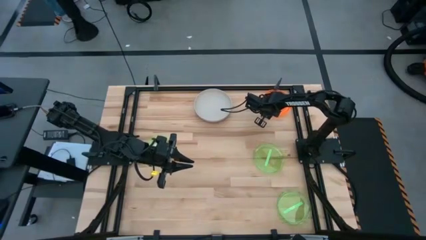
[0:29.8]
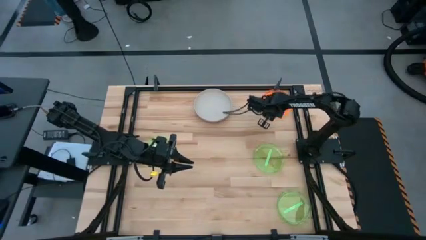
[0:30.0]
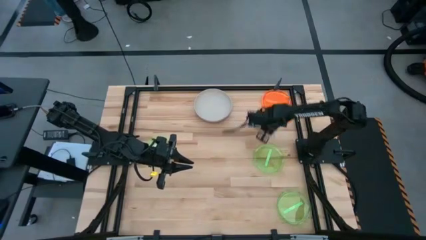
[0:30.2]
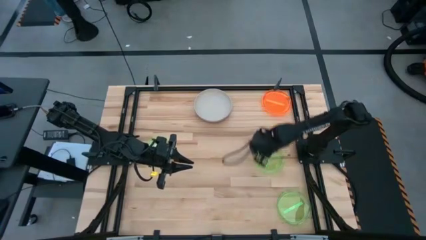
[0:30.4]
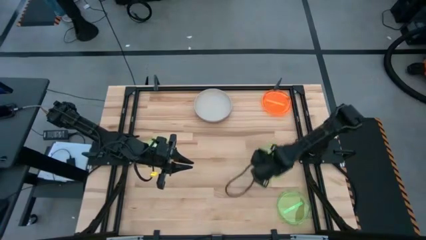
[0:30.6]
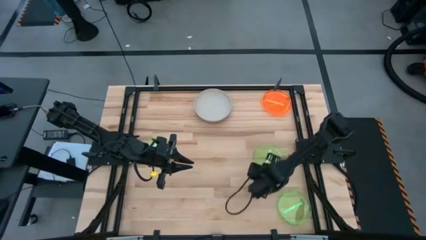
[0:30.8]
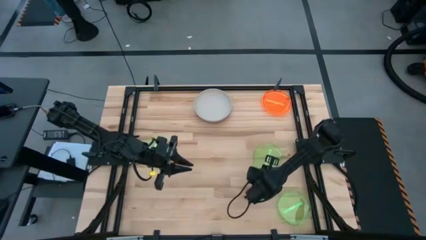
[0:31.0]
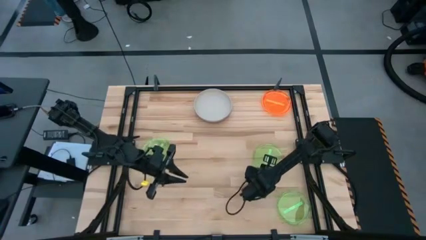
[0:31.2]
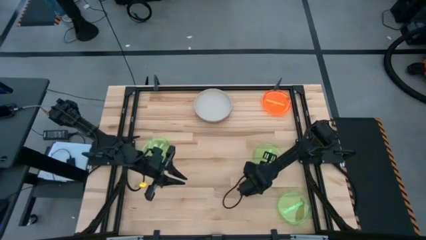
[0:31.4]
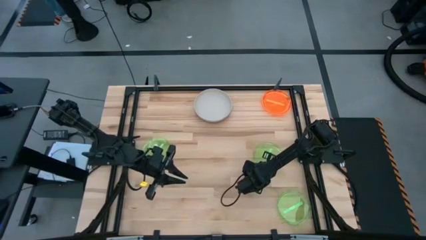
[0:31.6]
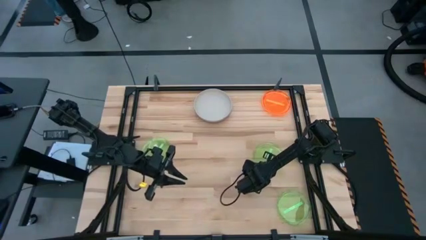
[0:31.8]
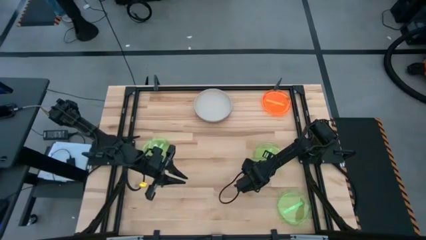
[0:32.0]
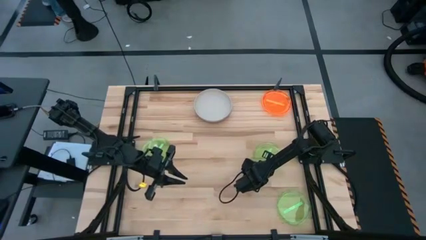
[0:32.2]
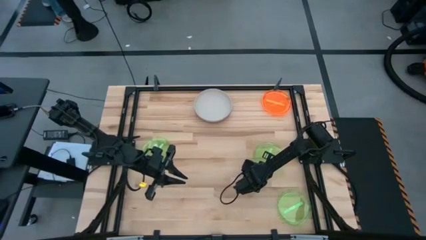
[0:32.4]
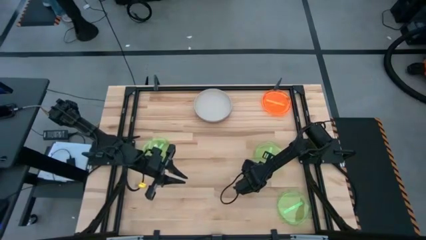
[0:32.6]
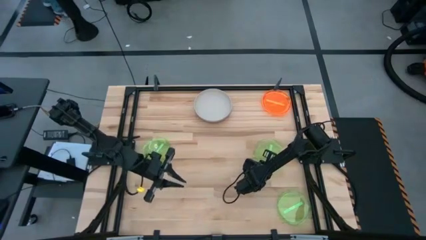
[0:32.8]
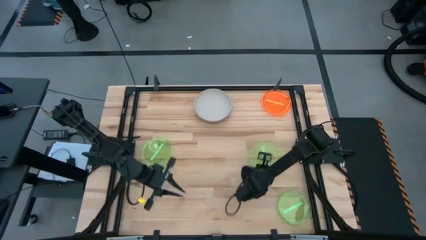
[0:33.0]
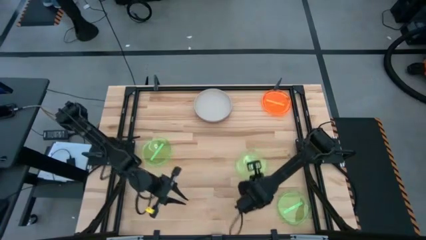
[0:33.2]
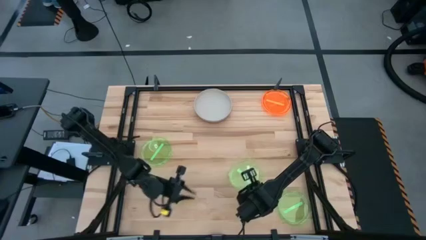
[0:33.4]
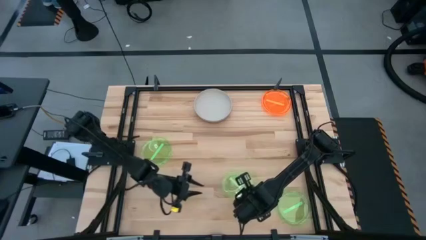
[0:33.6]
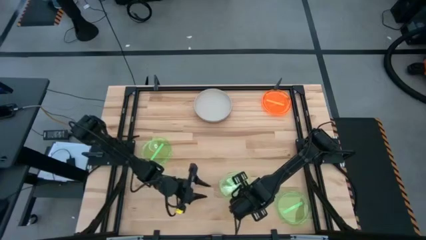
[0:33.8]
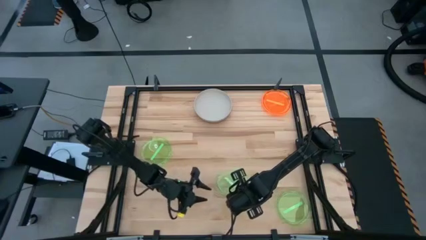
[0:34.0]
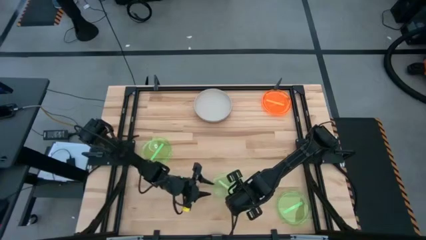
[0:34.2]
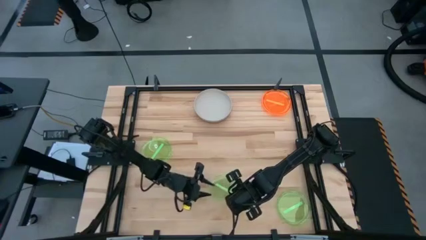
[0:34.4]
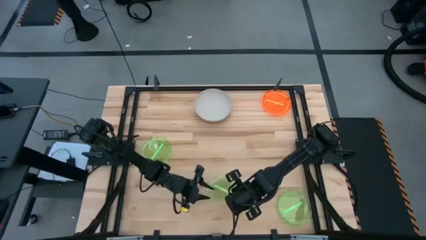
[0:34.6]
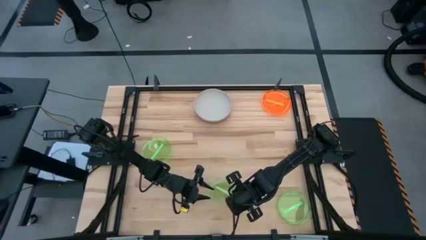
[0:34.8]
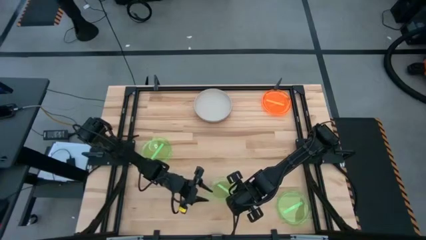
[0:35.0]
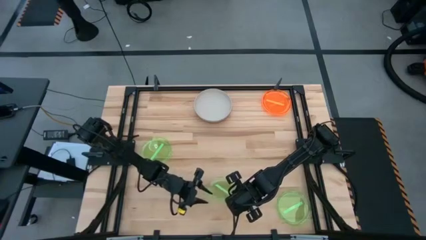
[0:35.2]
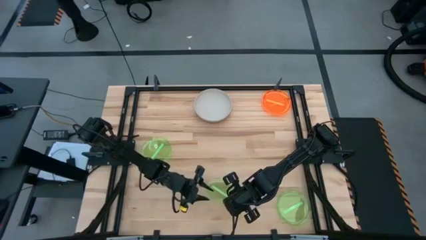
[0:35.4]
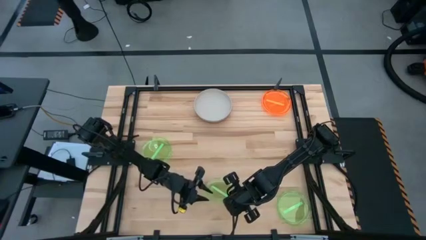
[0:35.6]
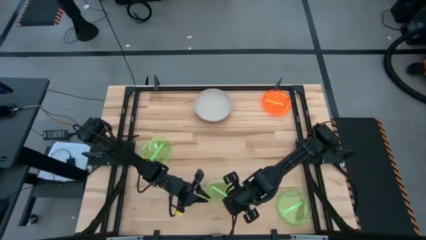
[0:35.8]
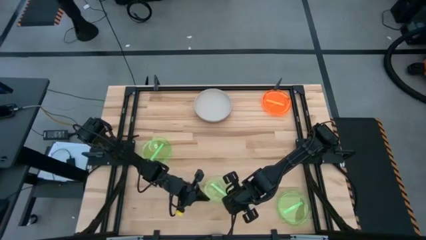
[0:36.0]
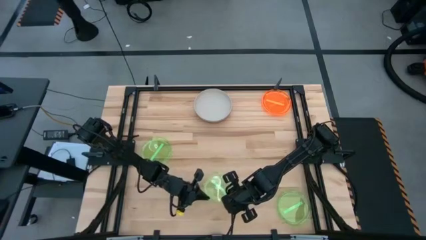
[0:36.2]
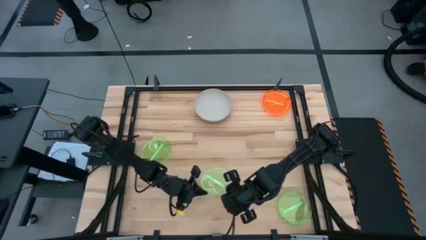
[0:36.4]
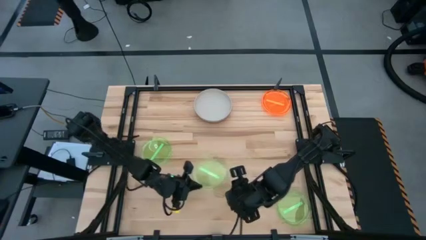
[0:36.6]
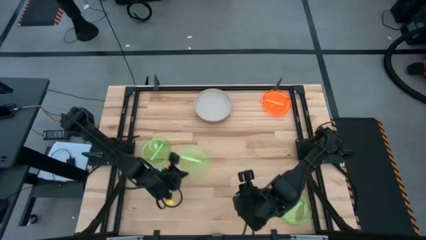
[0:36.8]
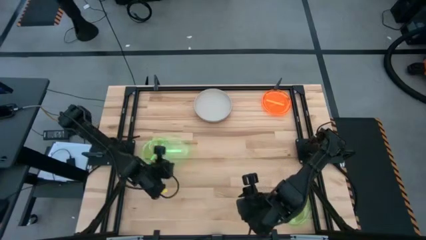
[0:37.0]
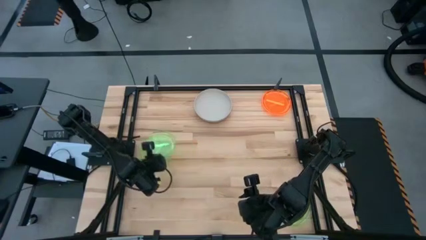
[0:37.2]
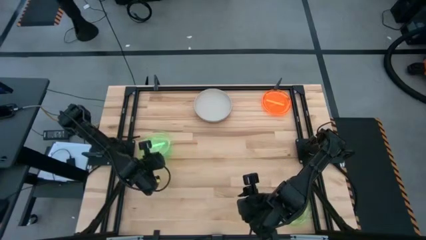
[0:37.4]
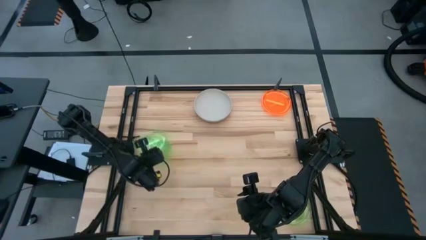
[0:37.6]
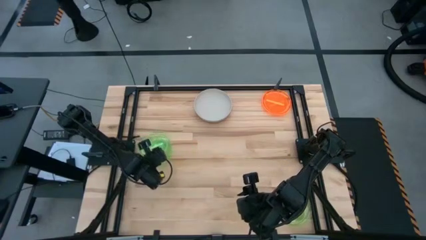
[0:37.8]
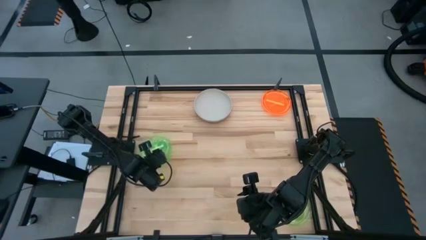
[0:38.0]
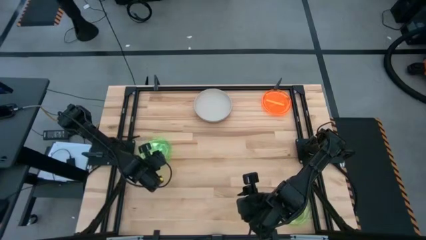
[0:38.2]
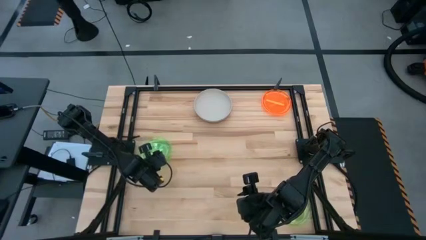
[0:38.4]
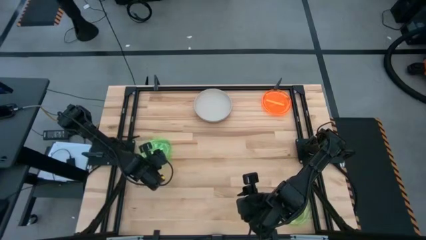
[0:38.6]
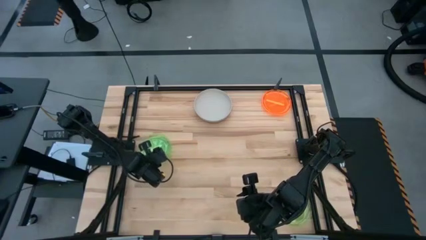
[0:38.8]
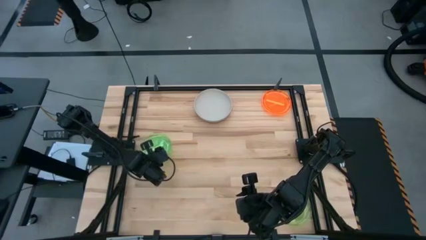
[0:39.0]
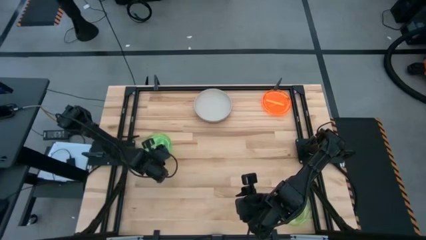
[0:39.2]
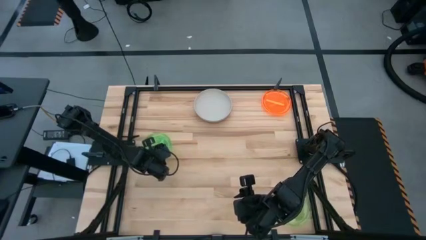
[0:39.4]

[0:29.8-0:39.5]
Task: Stack plastic plates
Stack the top right green plate on top of the top left green plate

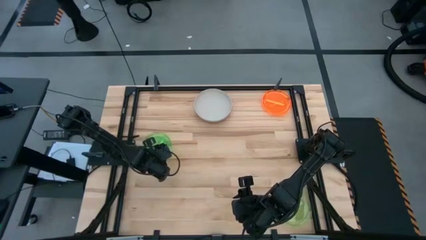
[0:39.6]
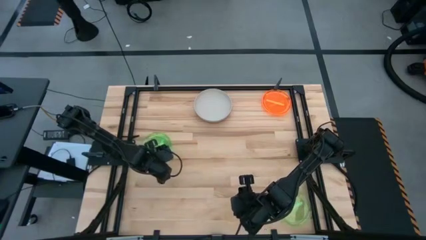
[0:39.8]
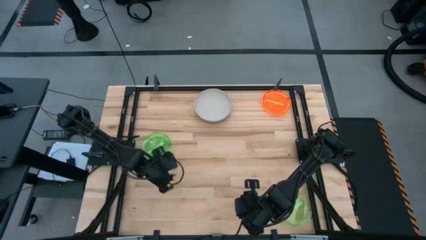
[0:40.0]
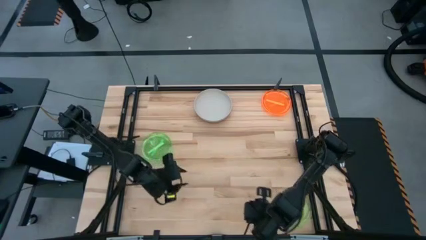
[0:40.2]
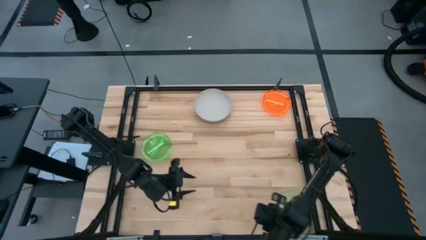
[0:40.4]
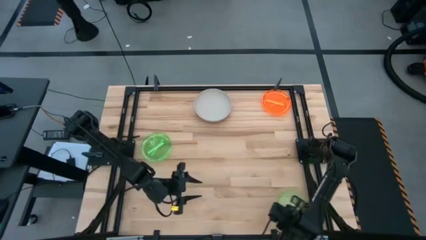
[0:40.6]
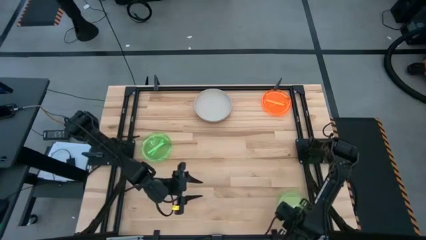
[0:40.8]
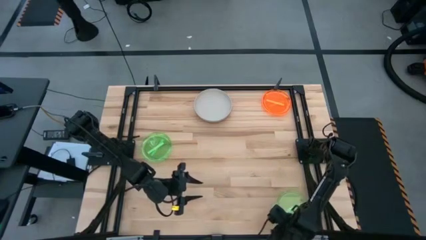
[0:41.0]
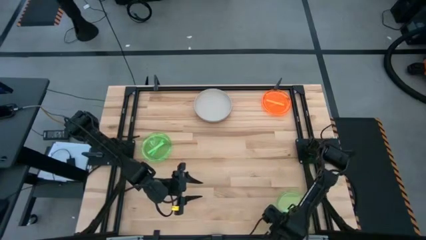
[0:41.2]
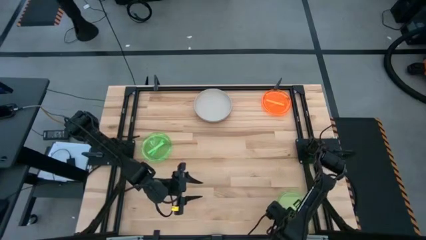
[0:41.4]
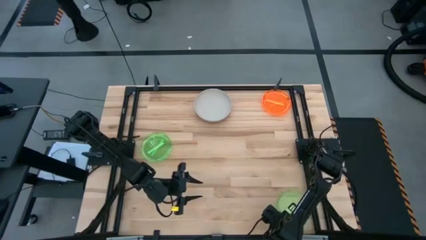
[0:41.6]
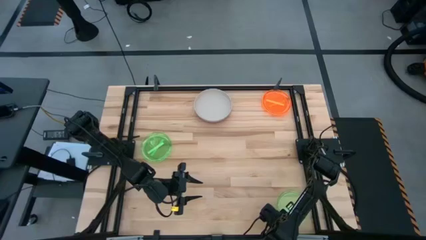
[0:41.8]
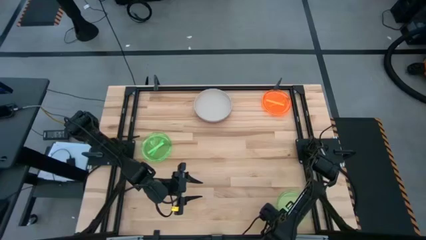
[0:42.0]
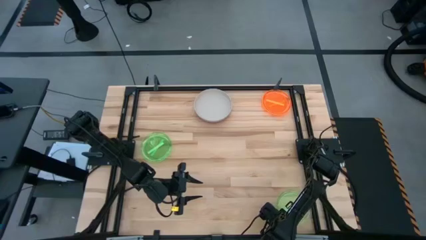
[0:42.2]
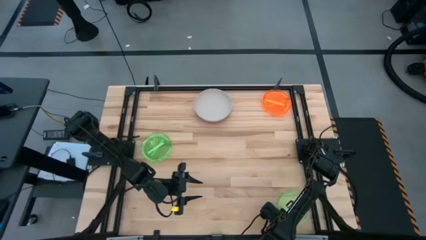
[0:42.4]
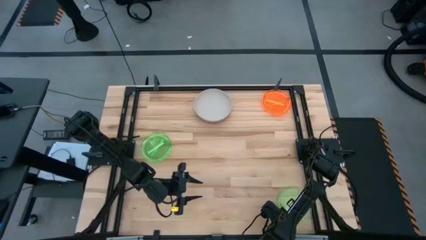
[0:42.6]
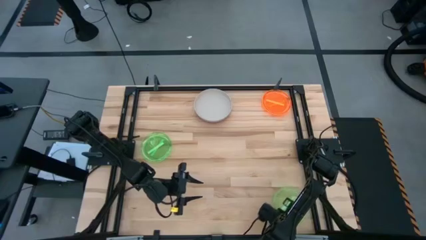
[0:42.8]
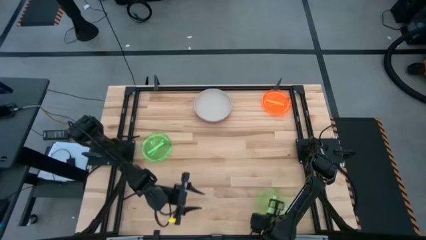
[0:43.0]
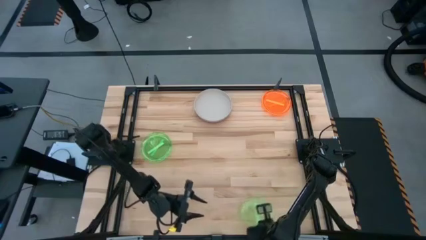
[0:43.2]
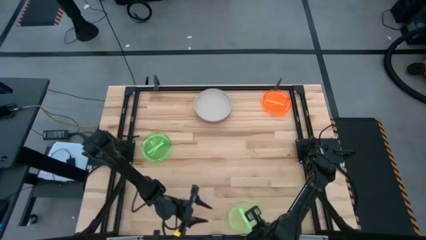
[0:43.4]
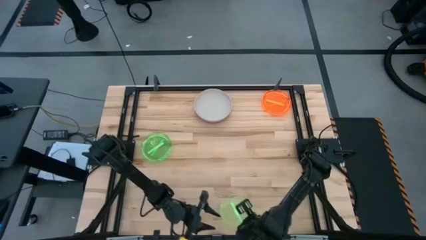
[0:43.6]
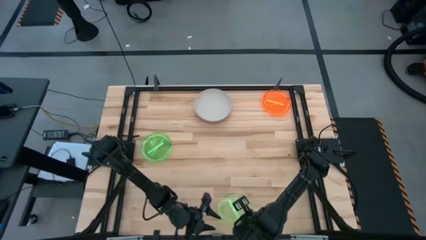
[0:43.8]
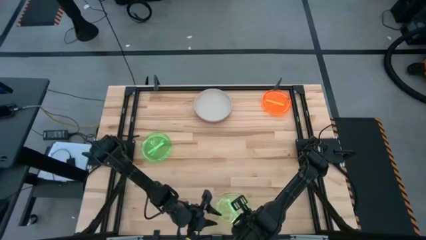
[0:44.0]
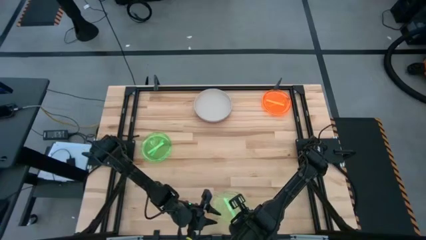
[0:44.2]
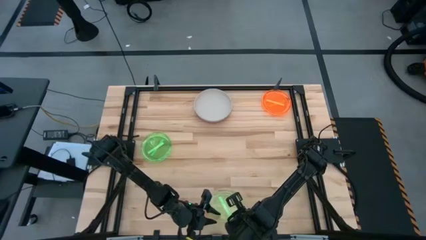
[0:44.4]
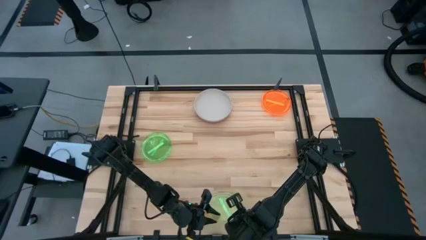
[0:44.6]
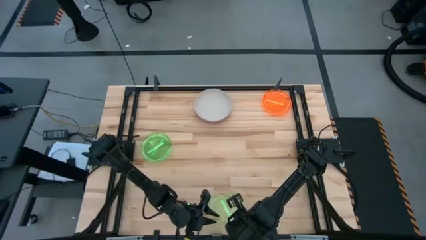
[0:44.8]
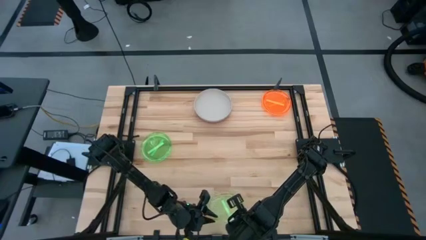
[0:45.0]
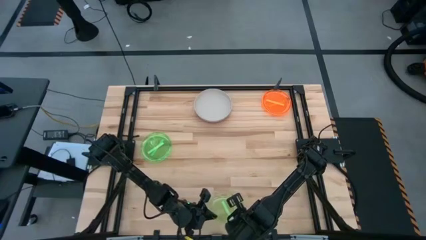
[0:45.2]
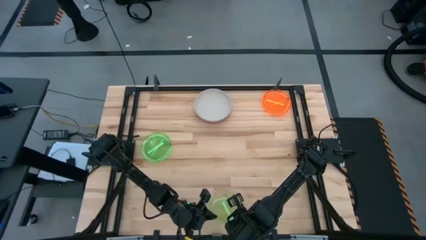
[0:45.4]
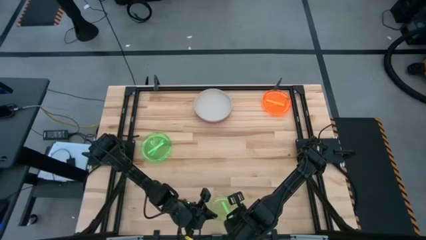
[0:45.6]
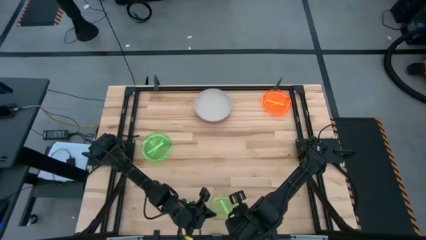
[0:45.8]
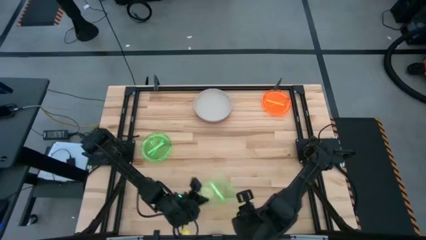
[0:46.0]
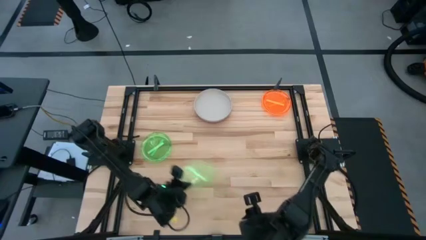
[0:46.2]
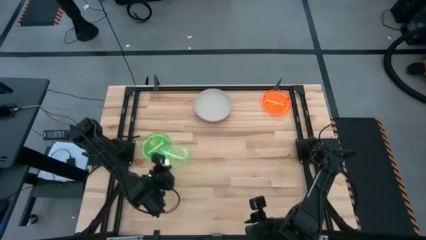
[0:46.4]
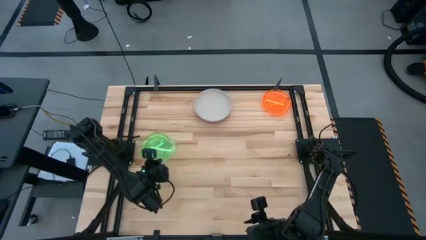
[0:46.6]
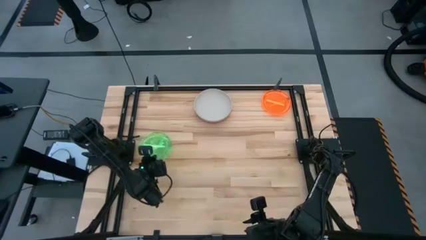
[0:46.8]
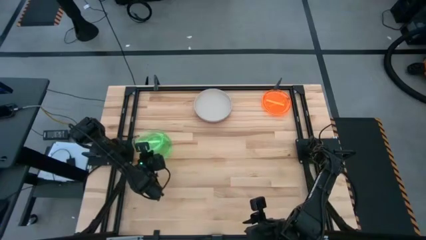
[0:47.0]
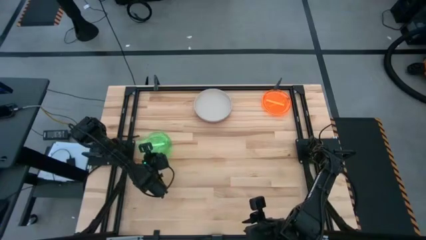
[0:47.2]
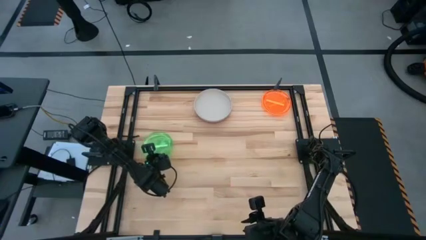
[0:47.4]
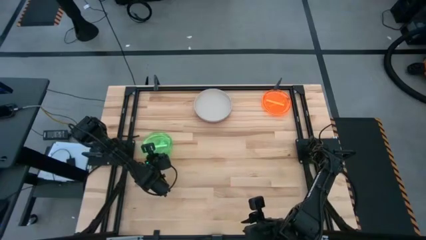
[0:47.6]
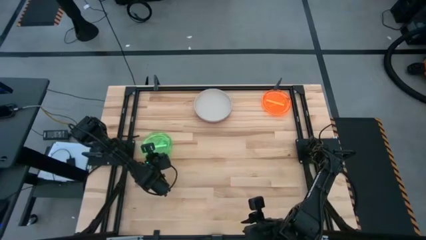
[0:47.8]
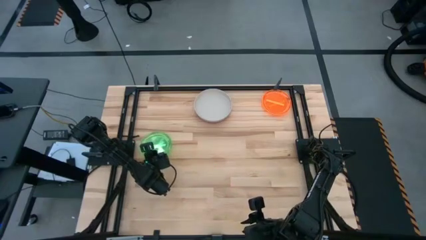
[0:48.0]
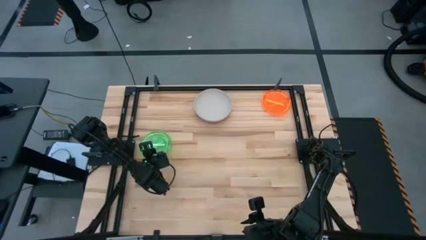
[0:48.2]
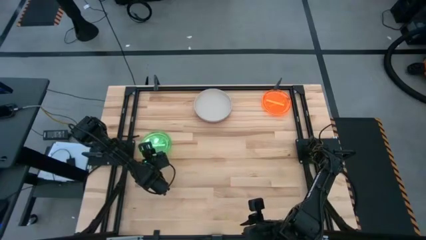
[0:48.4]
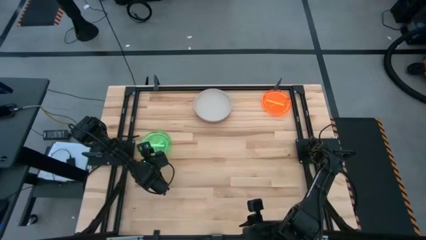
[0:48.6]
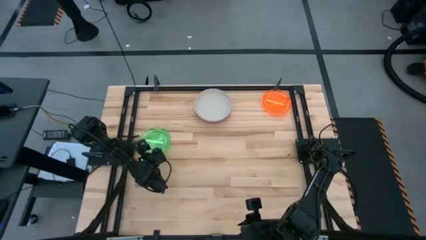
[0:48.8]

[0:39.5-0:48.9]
Stack the bottom green plate on top of the top green plate
